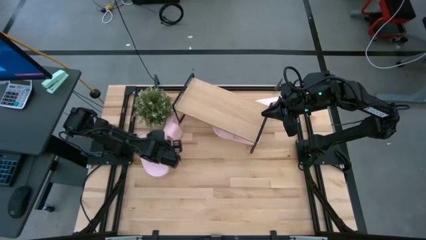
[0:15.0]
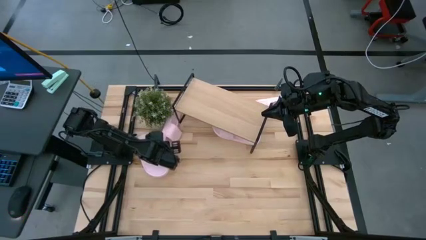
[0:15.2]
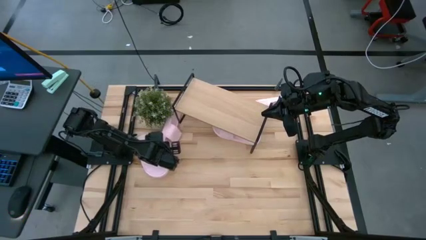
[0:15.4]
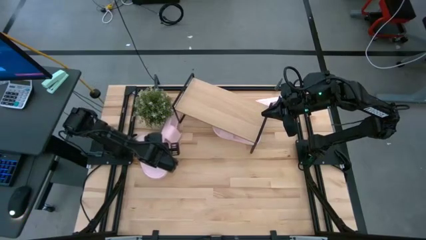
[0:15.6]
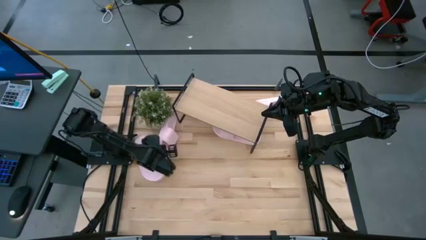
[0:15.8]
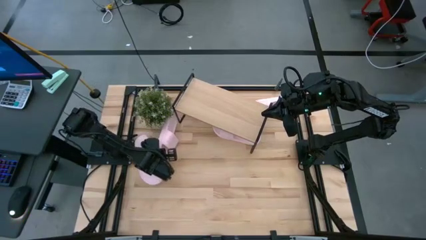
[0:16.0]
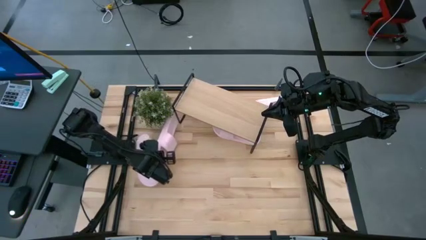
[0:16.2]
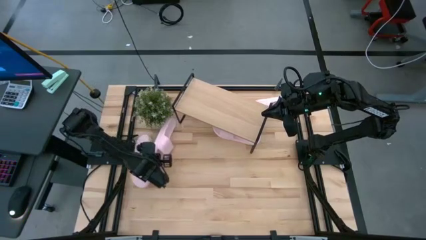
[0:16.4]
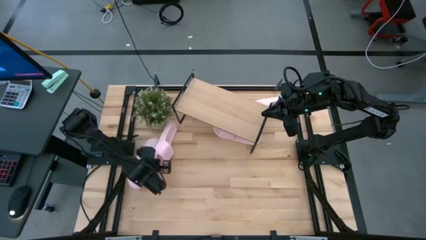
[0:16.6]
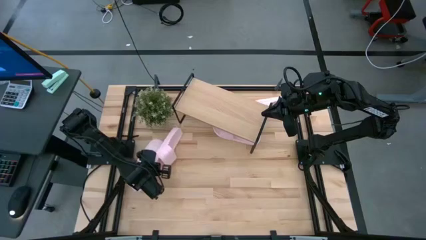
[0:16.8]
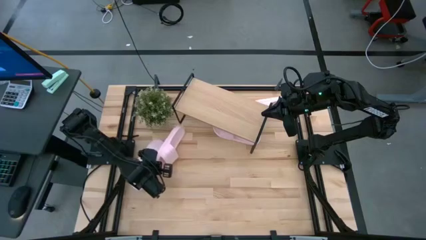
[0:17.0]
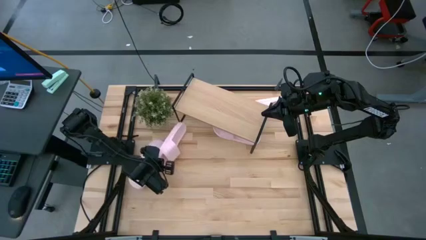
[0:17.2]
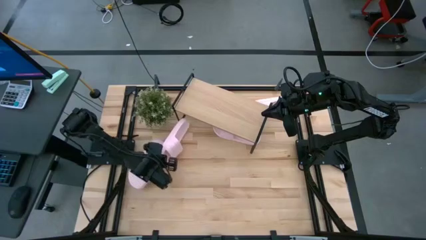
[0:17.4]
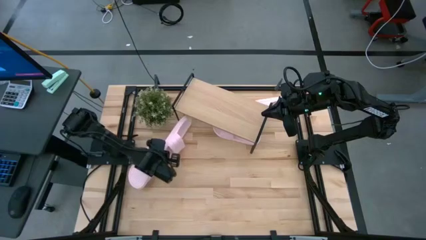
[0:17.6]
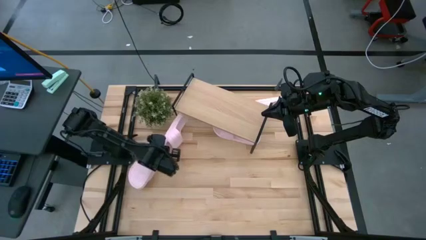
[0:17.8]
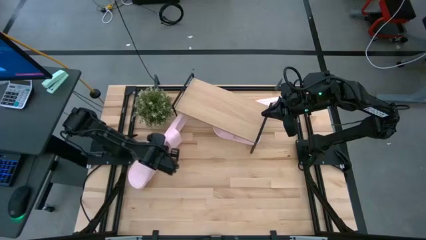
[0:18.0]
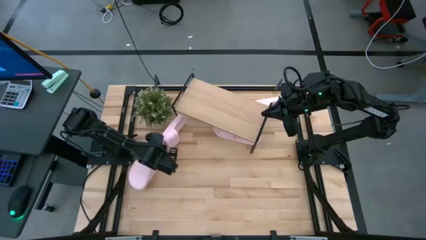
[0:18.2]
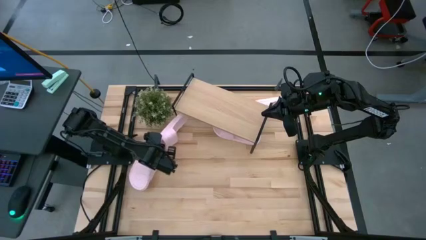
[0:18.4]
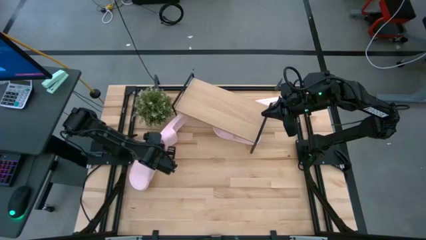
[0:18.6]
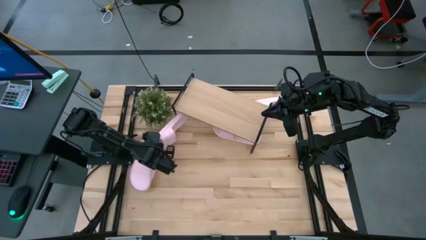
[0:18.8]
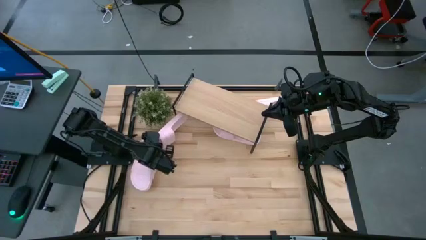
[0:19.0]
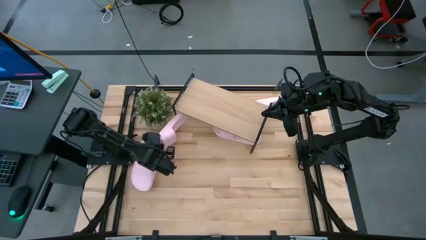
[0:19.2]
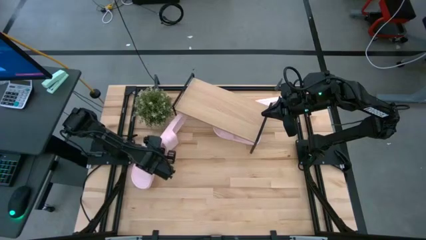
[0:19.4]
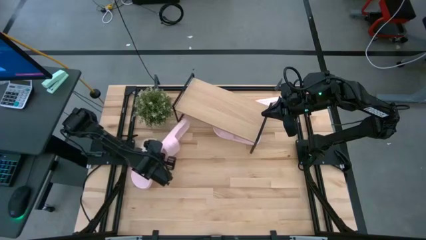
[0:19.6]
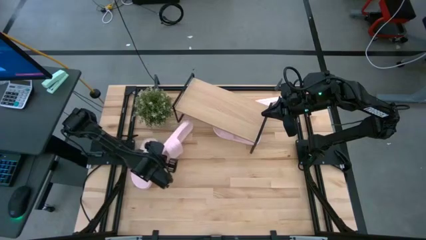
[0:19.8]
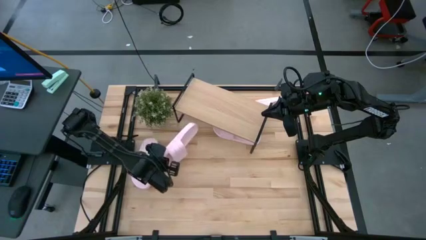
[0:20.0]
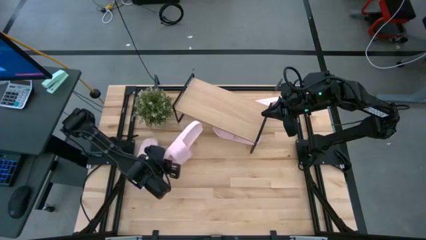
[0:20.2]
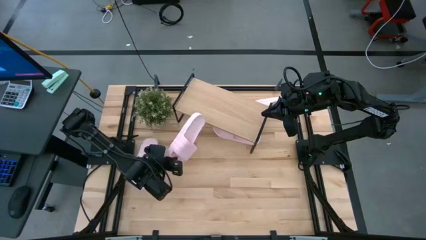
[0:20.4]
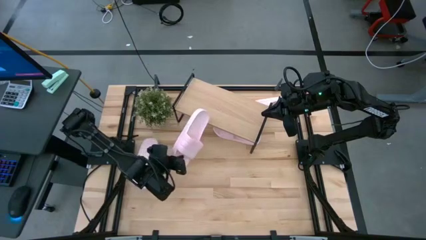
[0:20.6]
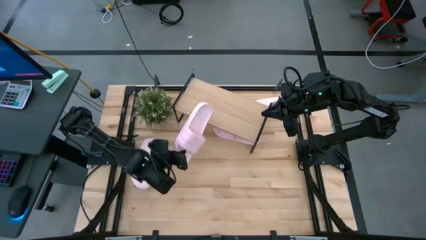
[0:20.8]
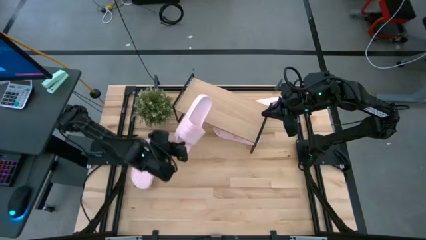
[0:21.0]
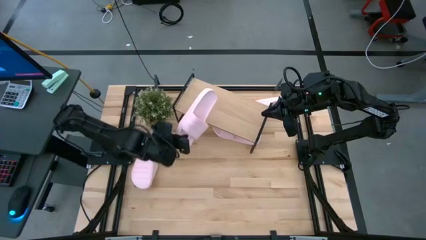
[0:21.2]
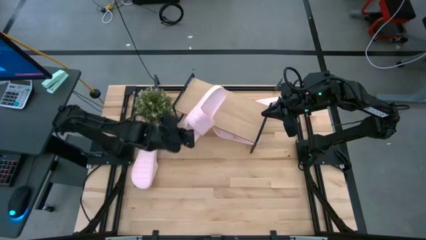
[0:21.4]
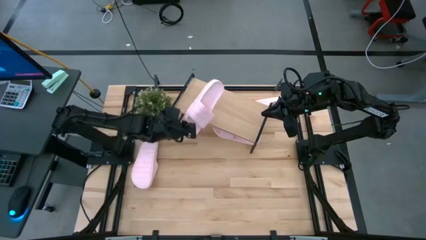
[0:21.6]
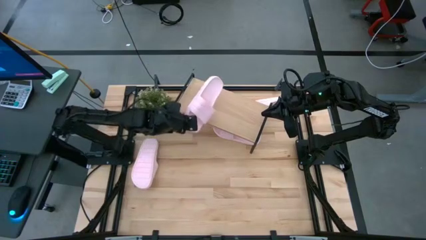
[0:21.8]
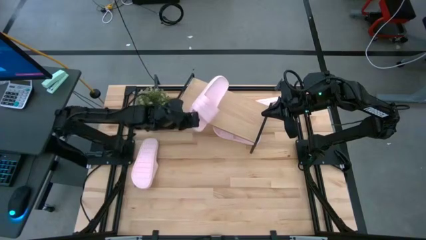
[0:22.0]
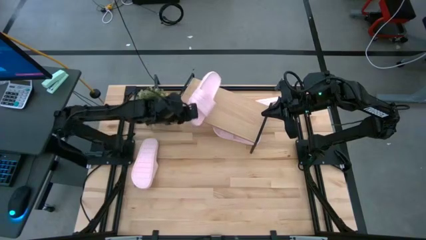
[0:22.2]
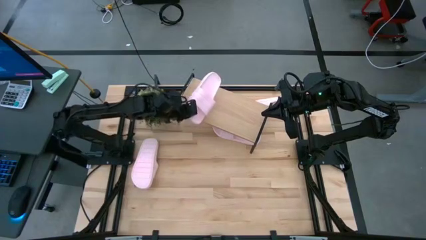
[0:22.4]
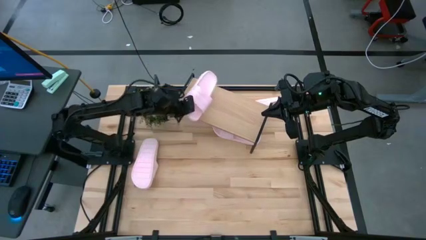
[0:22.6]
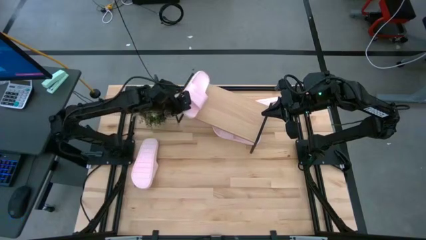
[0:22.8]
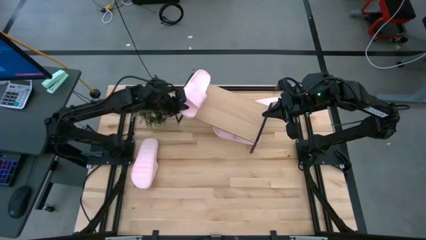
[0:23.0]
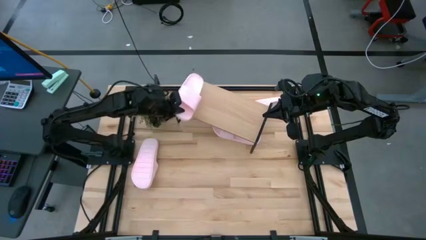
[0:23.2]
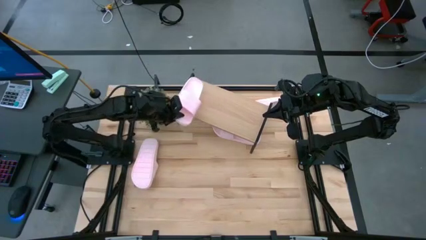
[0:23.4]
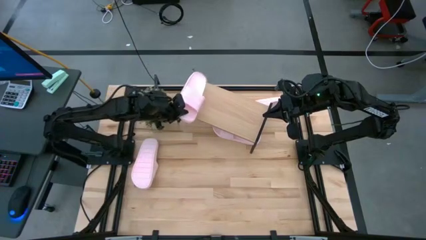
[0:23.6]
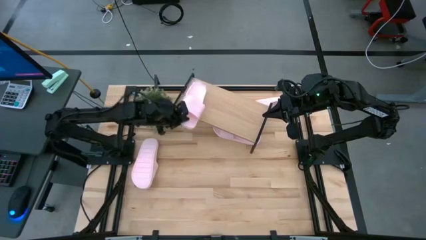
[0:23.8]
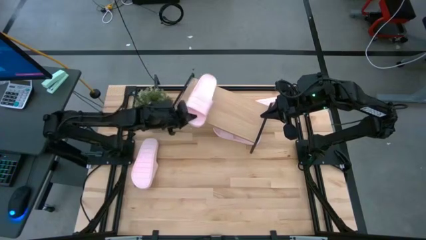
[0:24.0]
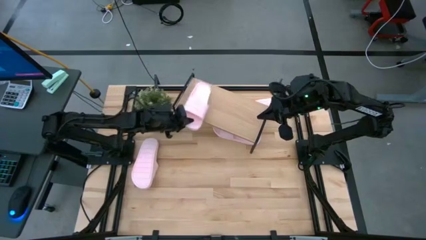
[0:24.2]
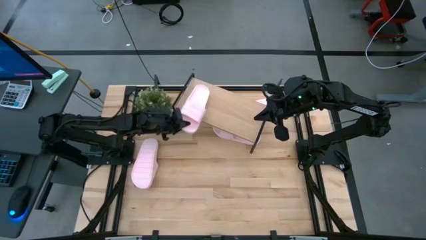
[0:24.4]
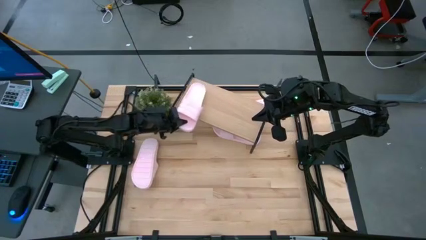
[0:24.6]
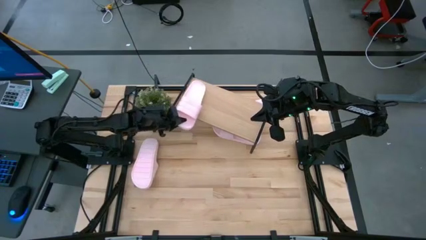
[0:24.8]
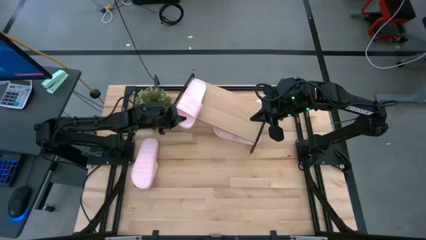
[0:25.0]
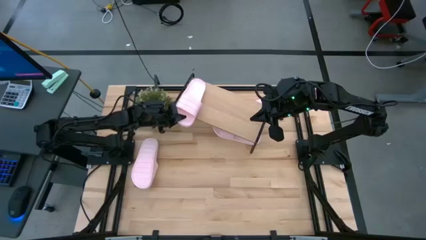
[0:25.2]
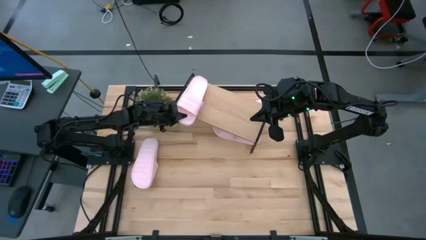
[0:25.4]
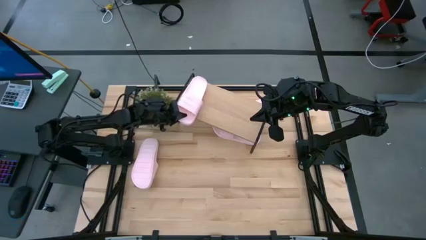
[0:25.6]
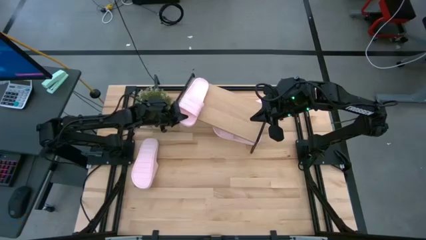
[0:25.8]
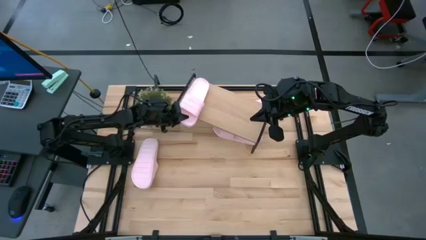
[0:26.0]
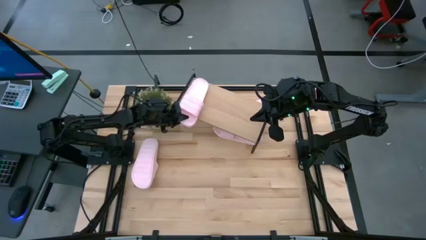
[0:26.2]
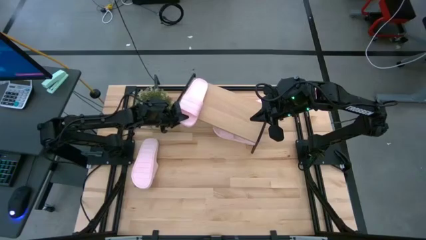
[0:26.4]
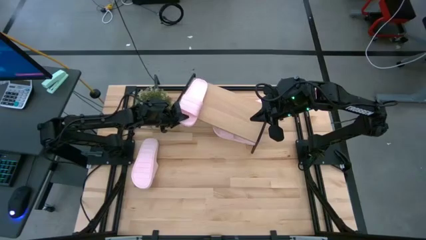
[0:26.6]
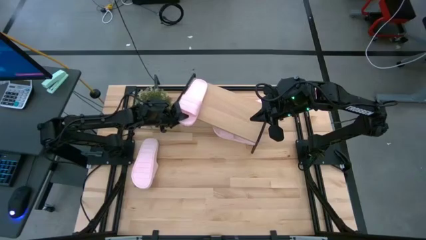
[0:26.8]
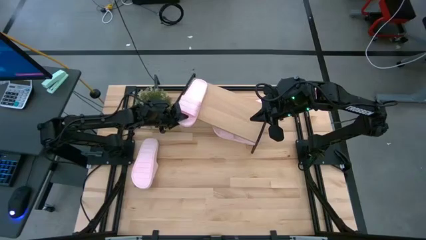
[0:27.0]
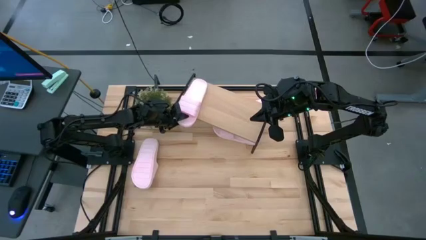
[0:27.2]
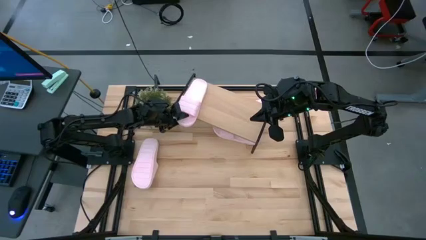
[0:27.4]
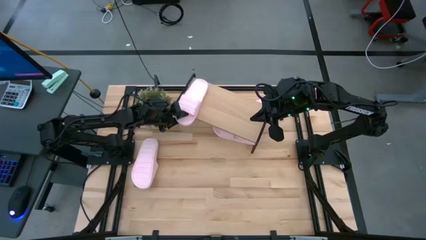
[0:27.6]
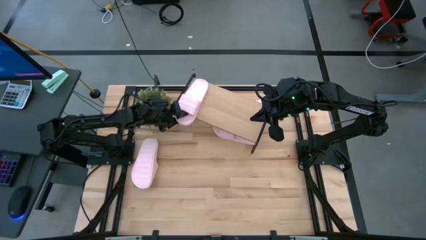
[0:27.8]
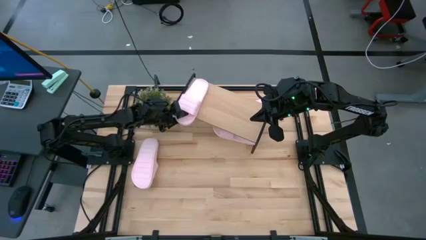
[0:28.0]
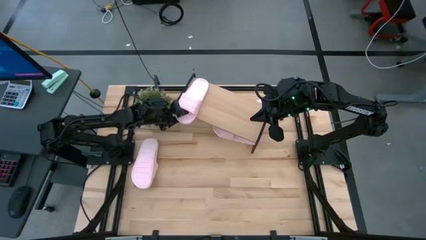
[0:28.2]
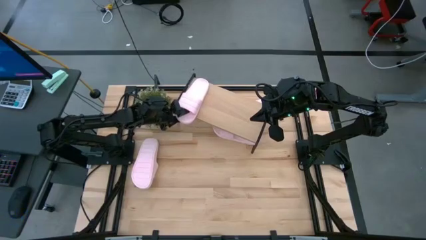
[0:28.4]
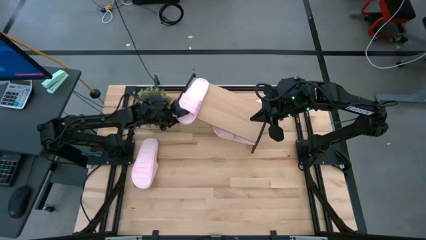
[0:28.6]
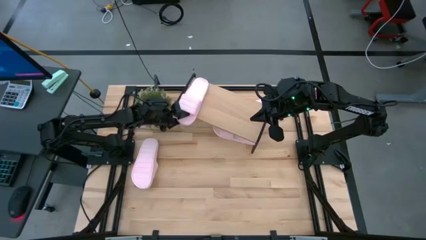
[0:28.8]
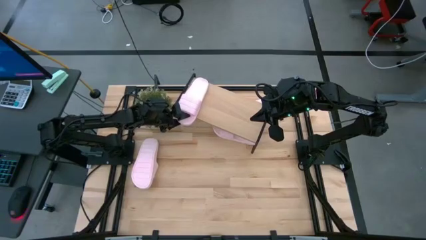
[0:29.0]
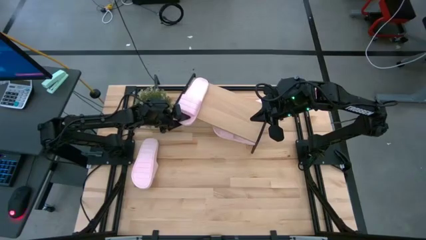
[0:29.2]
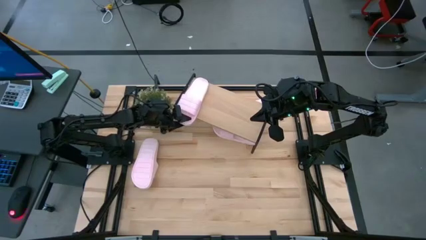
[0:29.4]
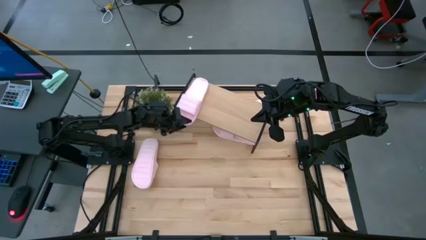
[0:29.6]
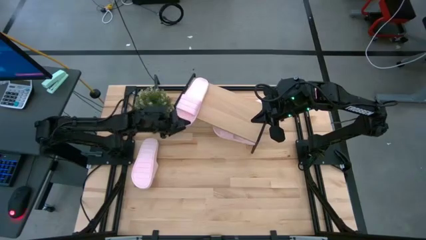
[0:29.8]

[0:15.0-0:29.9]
Task: Pick and place slides into the shelf
Put the pink slide on the shelf
